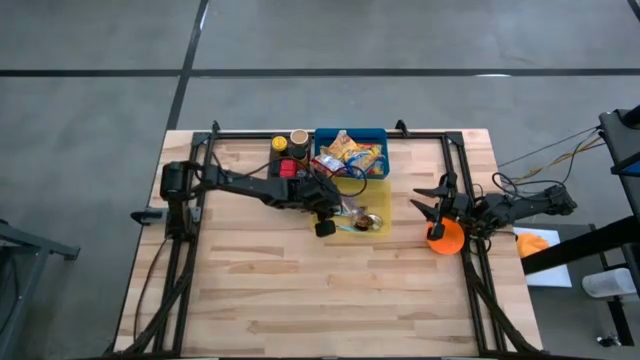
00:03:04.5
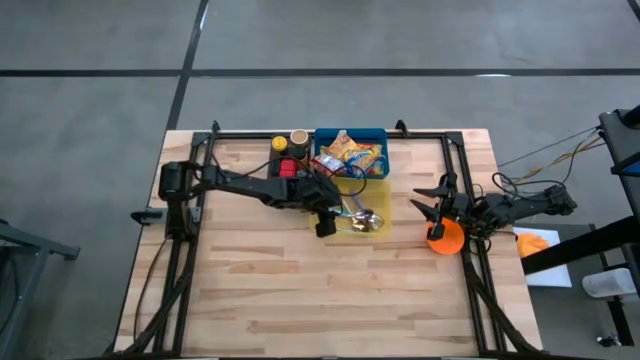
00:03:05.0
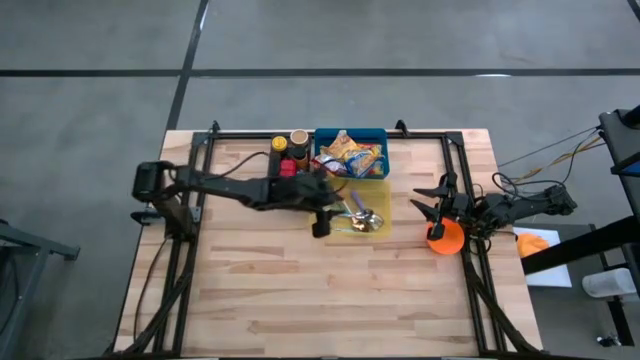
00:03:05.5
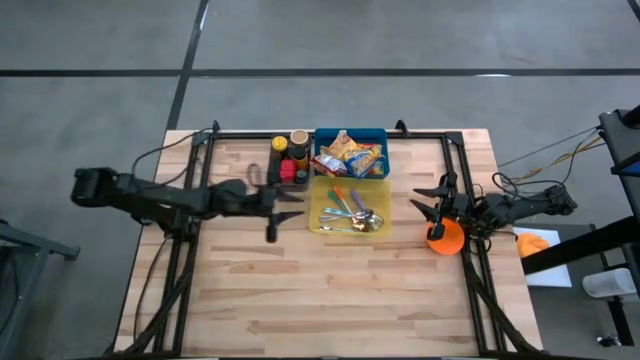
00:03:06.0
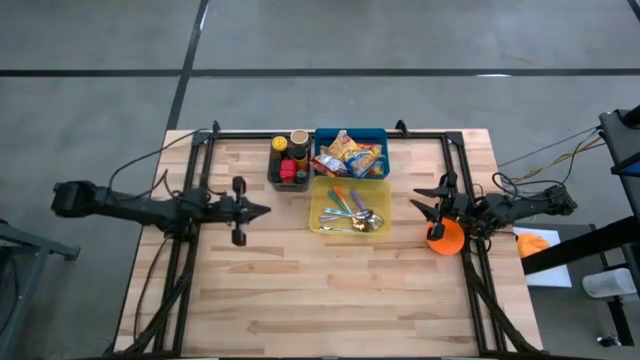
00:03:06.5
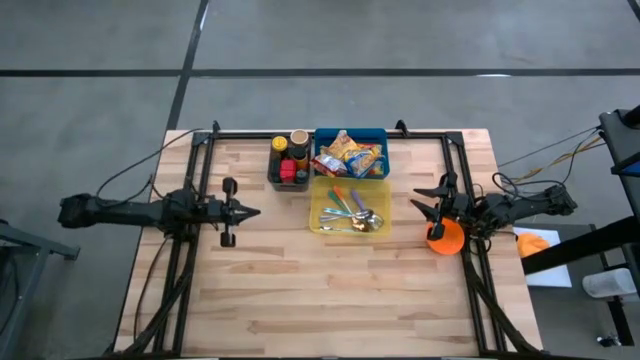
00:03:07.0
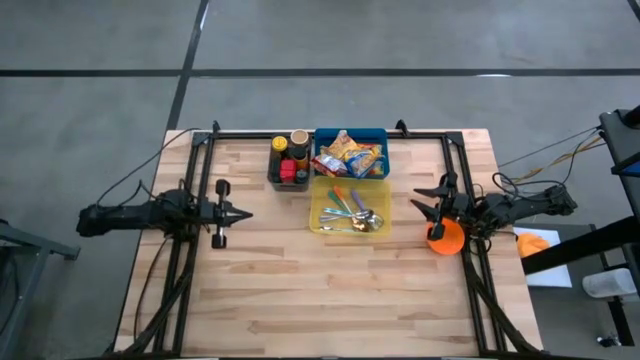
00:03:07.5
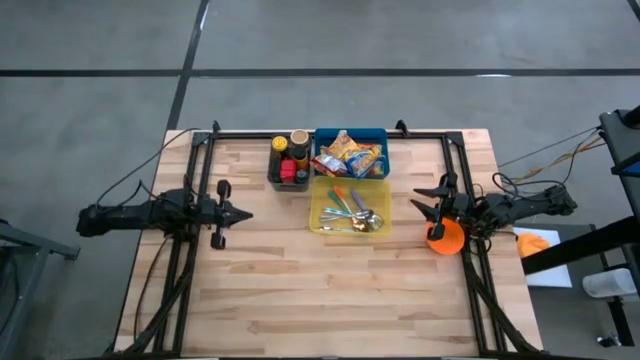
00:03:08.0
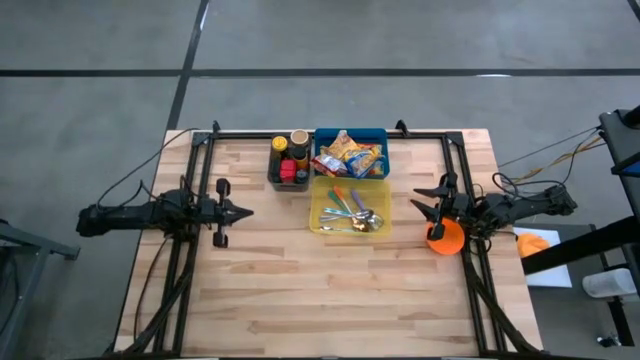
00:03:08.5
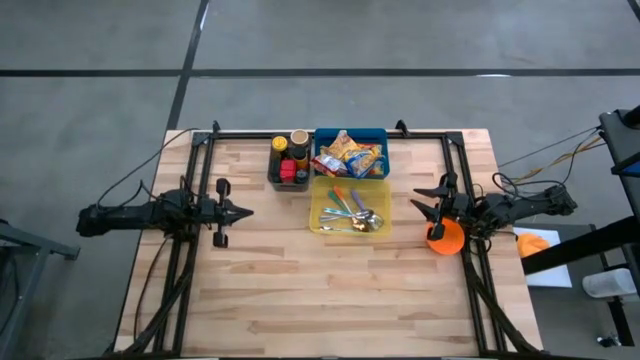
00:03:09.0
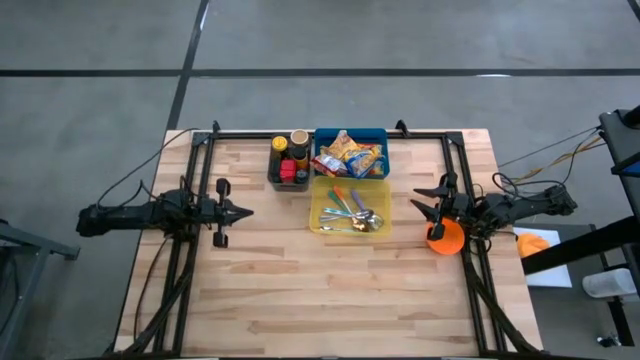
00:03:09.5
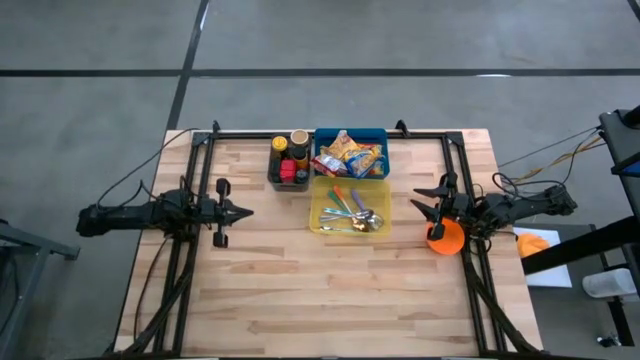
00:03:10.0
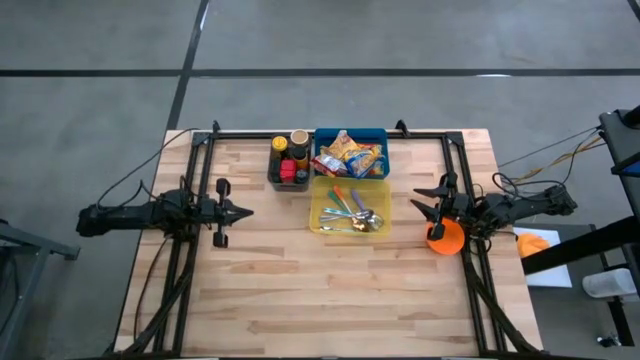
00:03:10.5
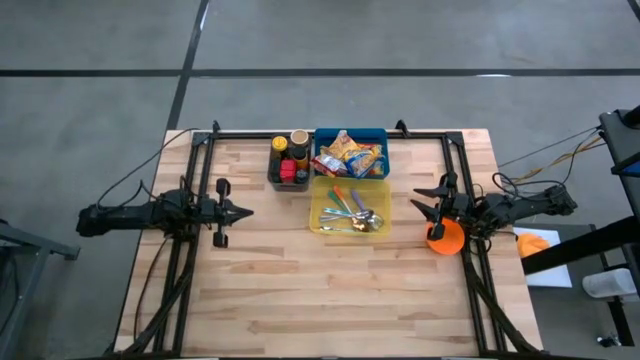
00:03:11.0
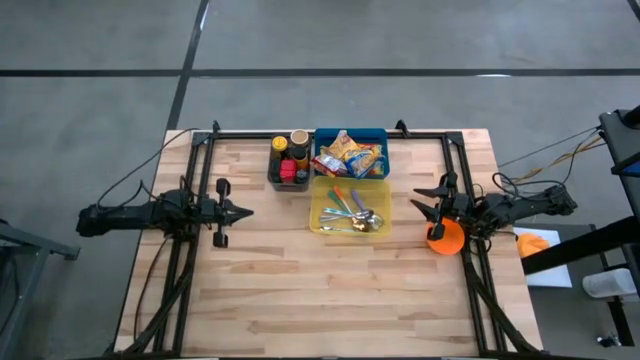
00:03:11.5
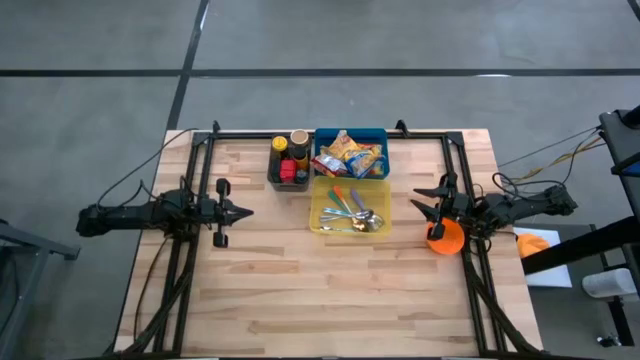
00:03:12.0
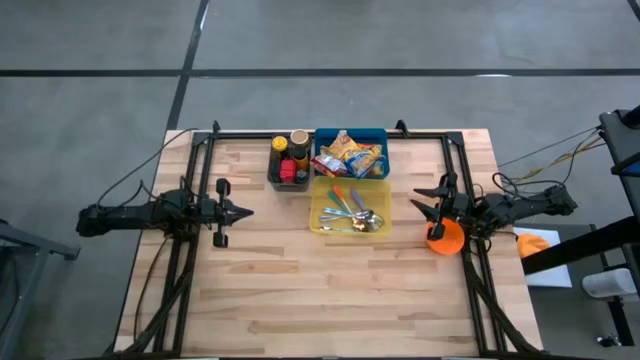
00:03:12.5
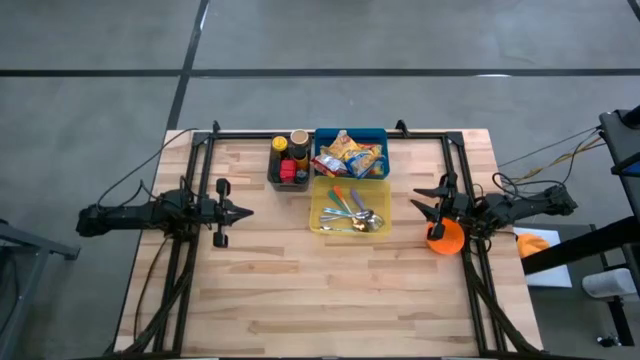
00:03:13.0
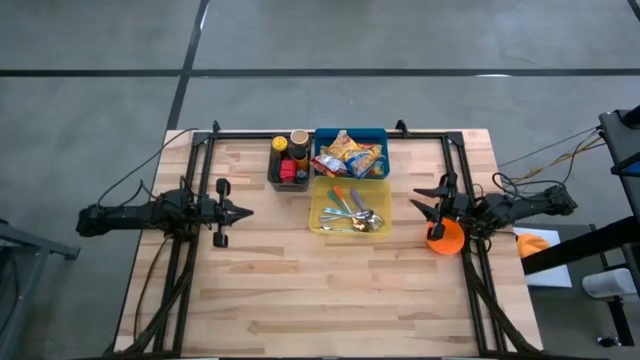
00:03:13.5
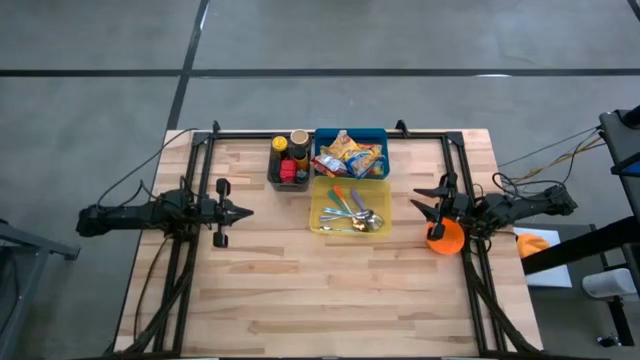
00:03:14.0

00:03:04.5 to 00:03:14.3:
Return to Home Position
